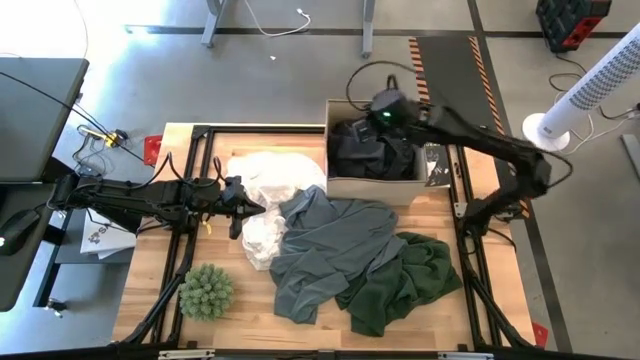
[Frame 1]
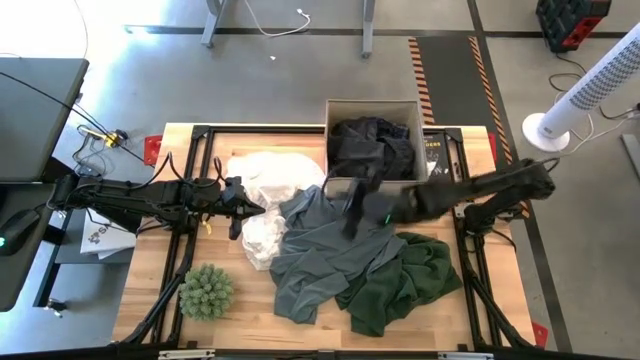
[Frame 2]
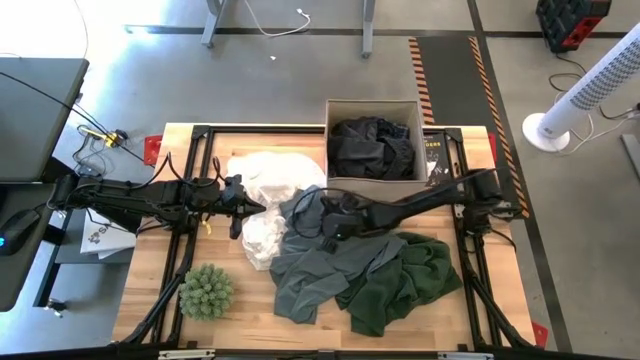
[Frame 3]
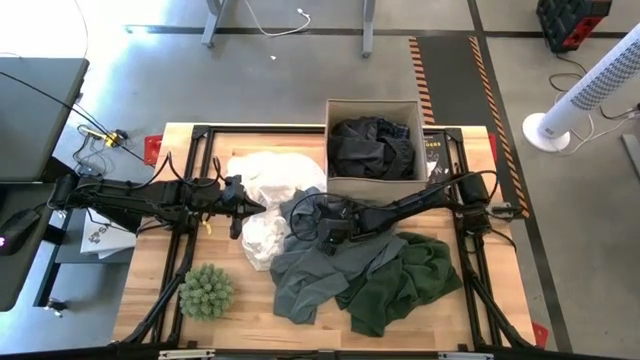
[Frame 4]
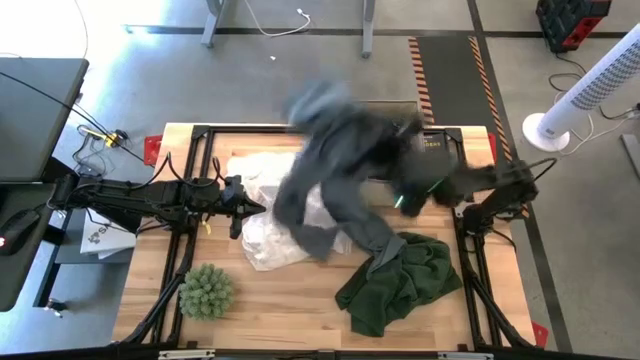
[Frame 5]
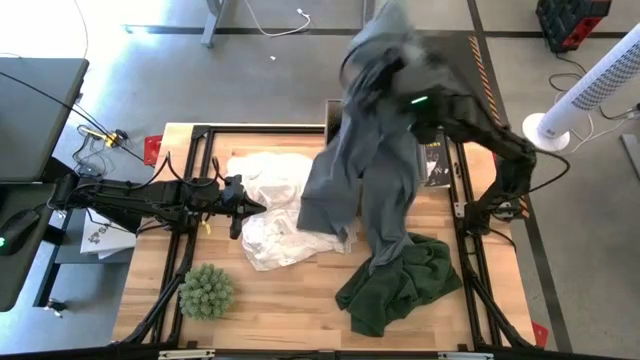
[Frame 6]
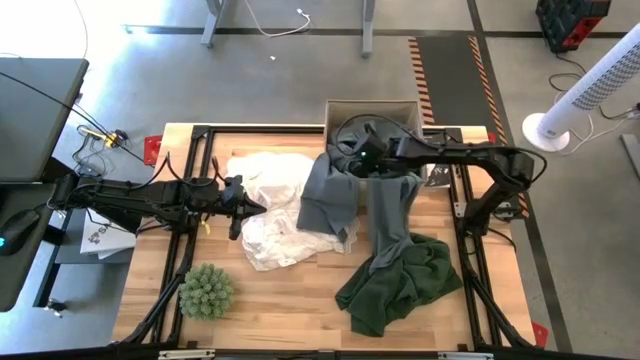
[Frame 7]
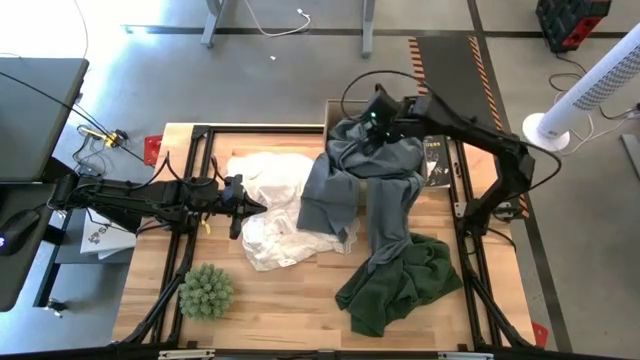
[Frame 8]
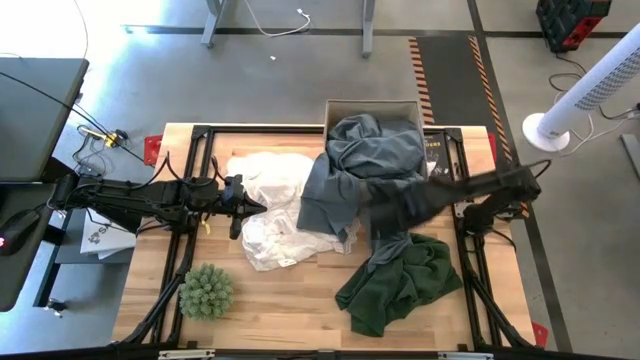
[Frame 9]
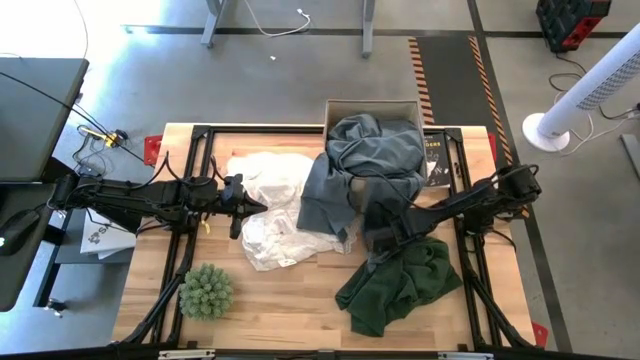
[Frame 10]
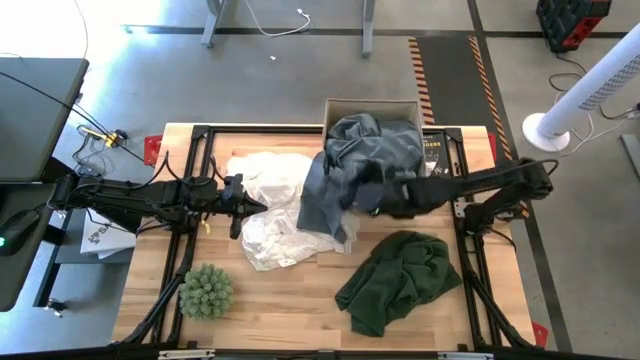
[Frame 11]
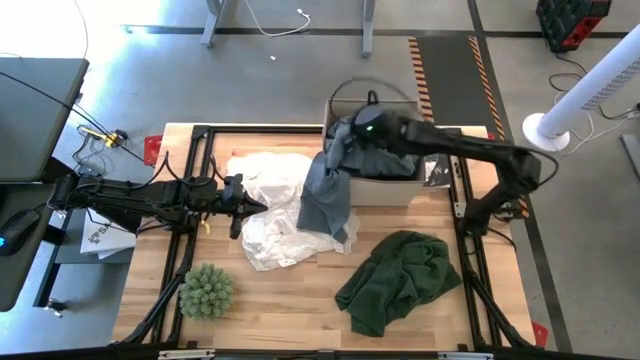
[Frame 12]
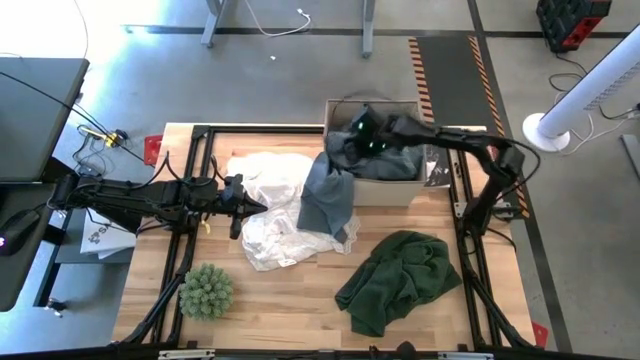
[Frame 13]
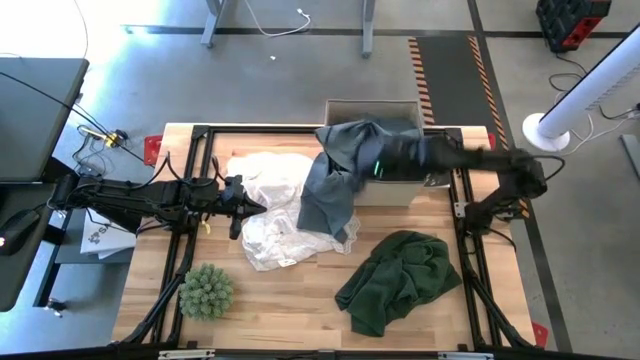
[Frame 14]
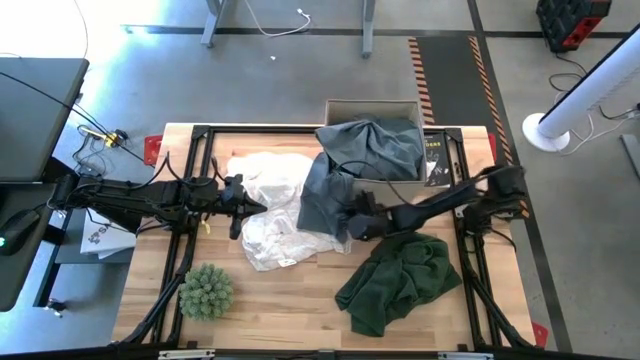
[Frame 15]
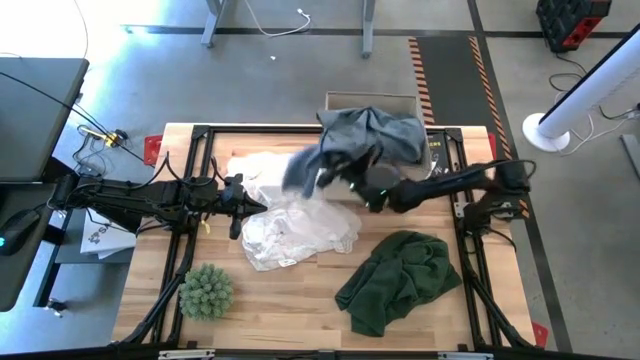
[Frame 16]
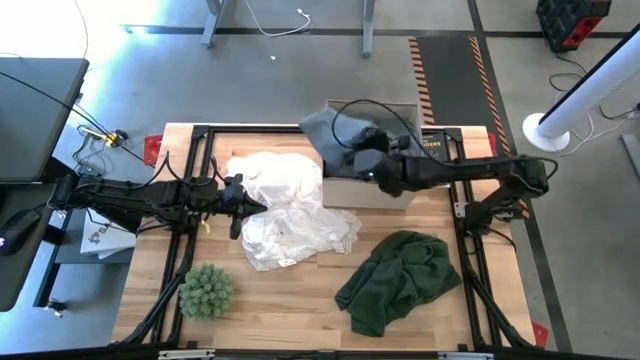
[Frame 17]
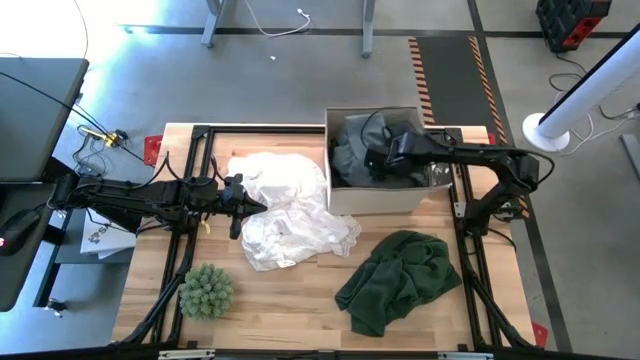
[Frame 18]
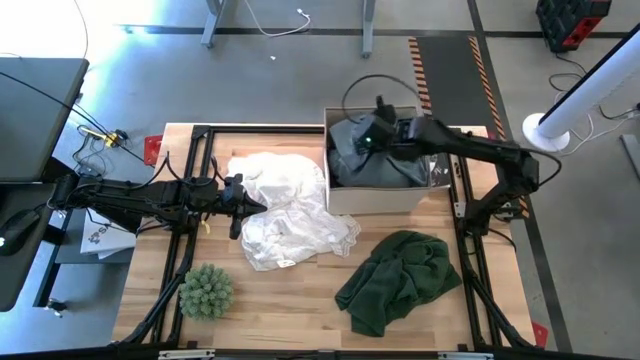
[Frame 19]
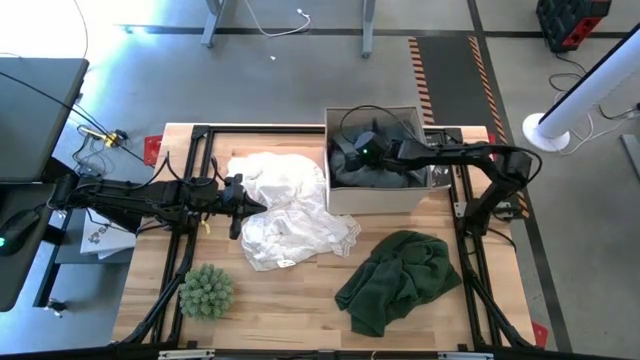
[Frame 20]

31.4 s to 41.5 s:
Task: Sort clothes
Put the gray pants into the laundry bin

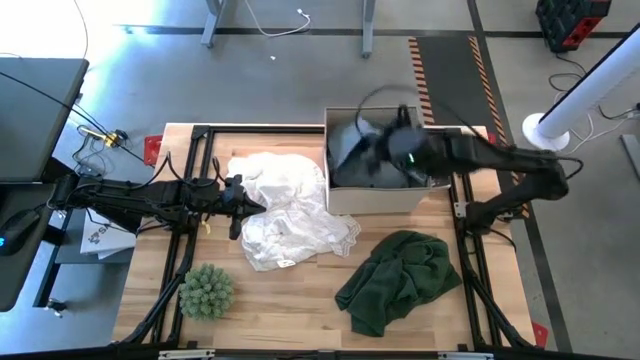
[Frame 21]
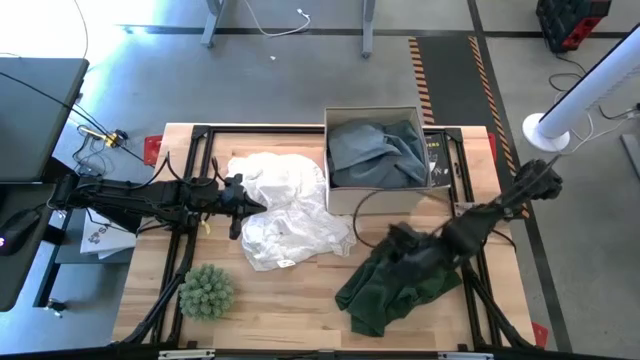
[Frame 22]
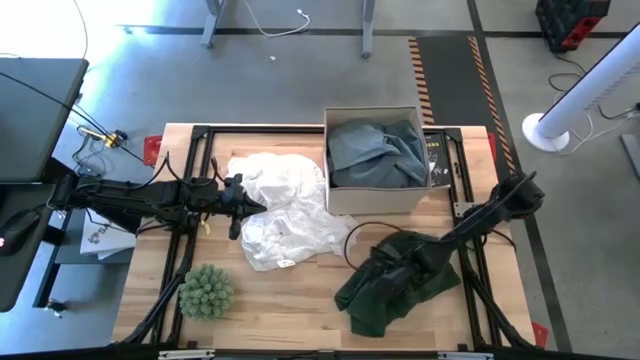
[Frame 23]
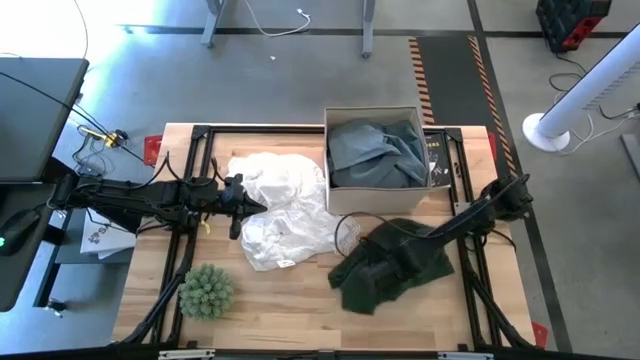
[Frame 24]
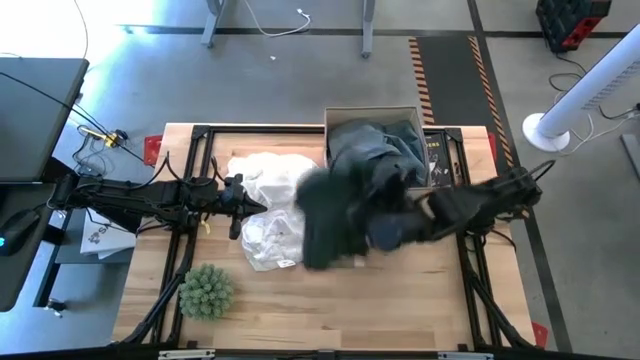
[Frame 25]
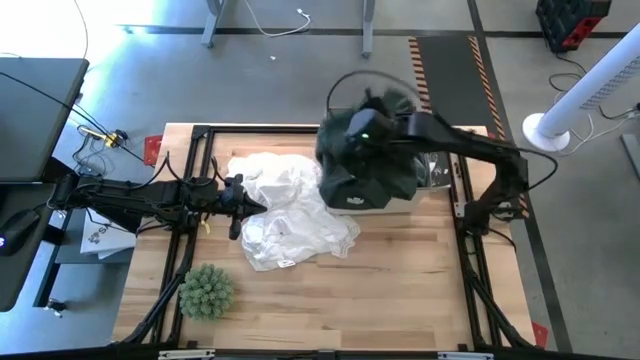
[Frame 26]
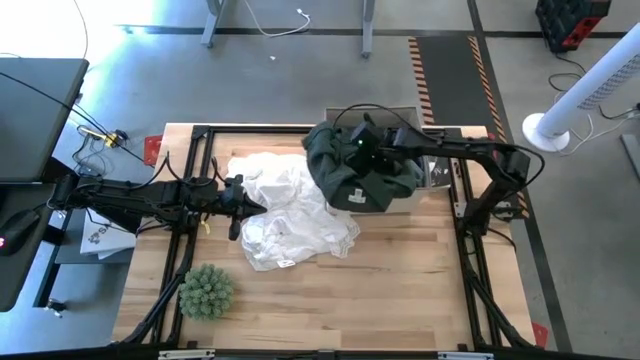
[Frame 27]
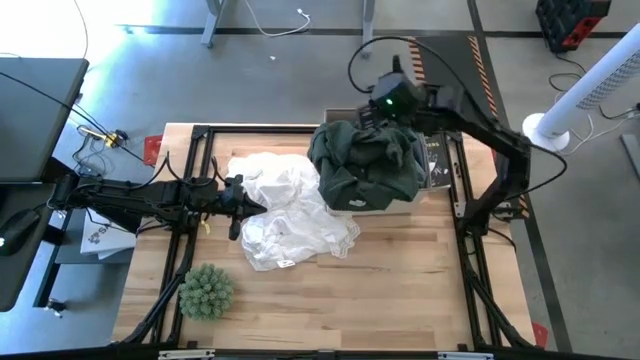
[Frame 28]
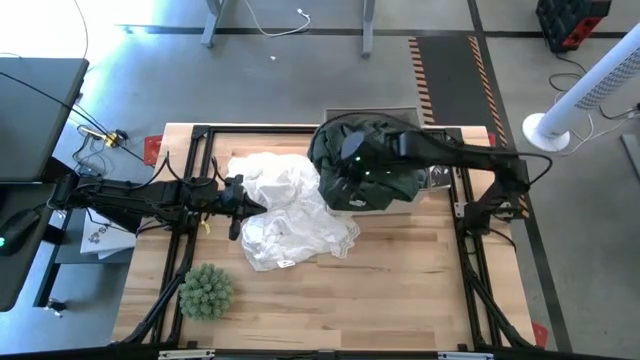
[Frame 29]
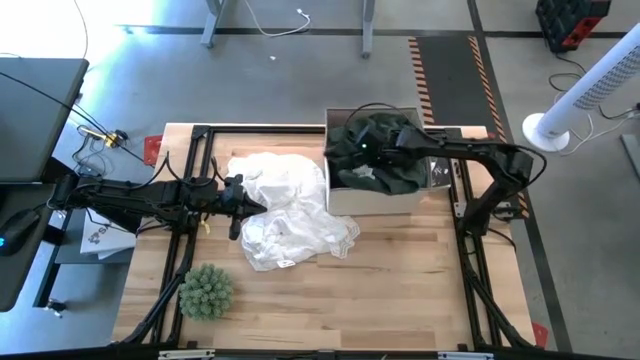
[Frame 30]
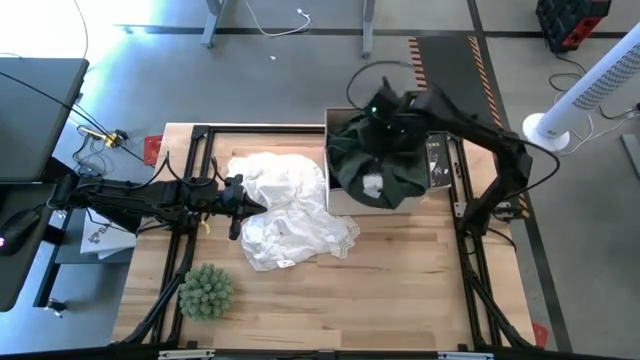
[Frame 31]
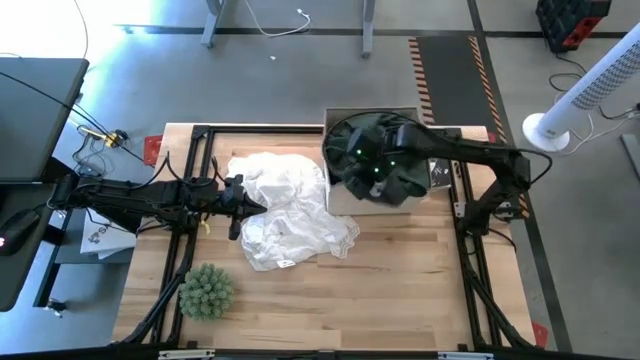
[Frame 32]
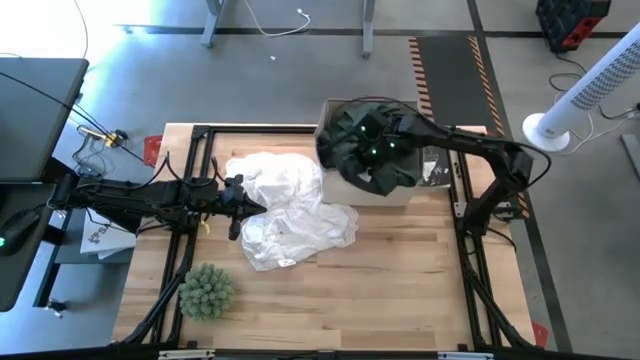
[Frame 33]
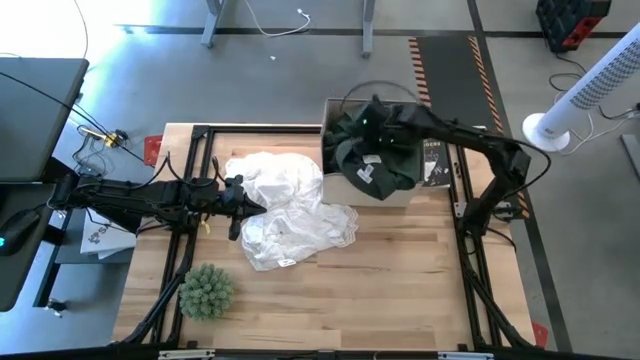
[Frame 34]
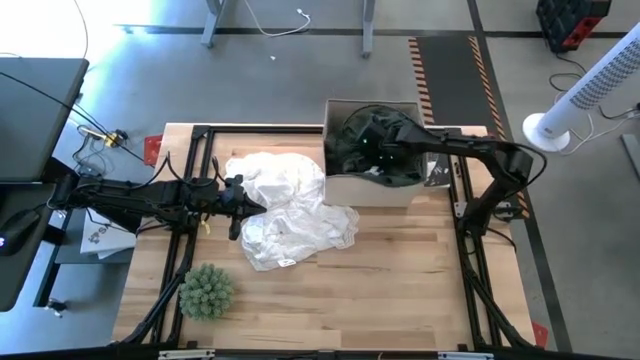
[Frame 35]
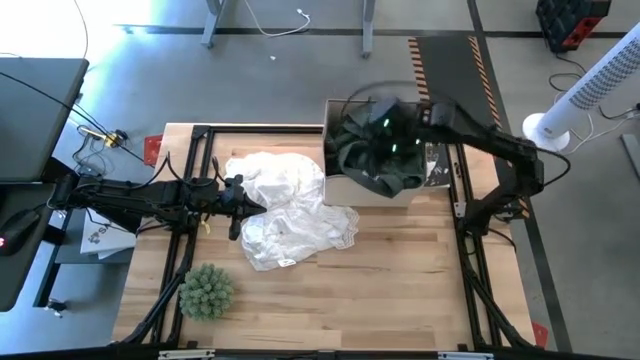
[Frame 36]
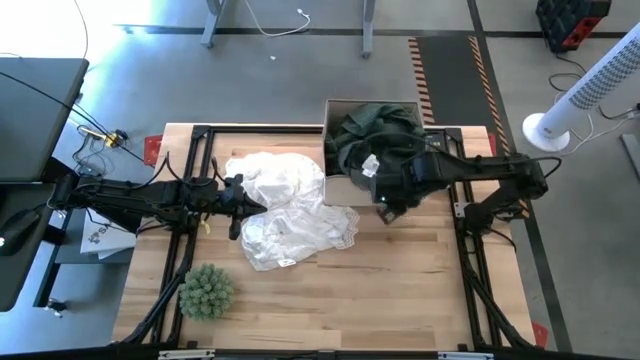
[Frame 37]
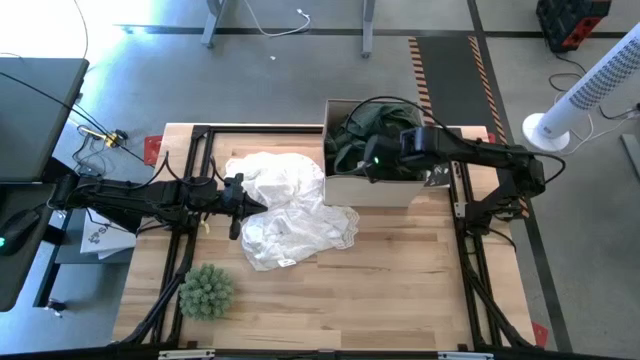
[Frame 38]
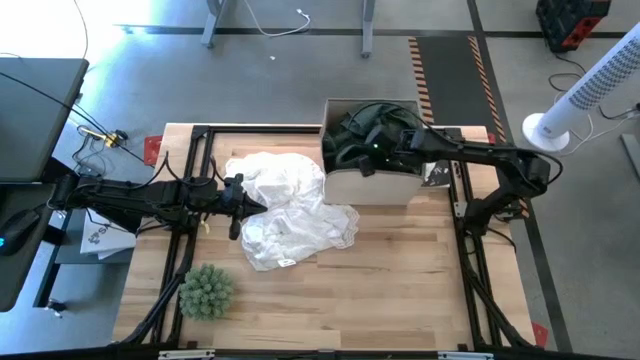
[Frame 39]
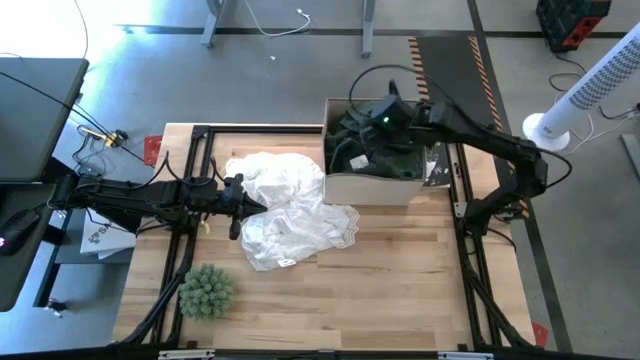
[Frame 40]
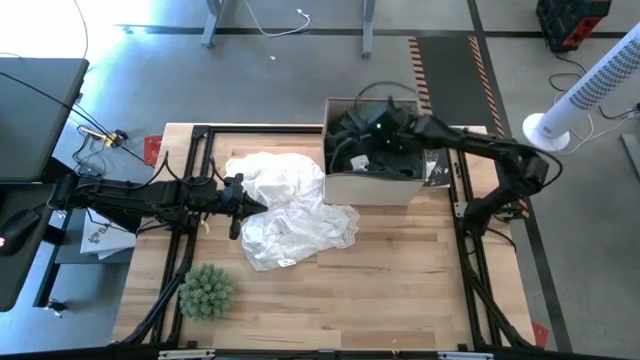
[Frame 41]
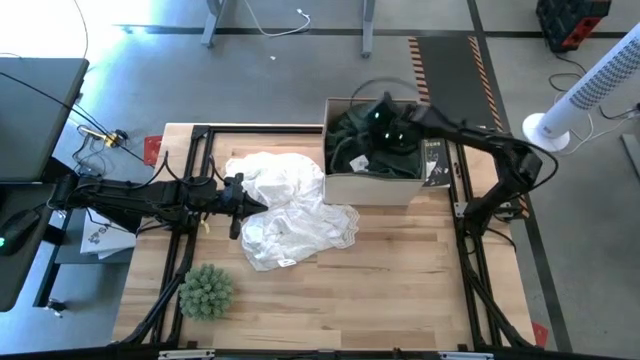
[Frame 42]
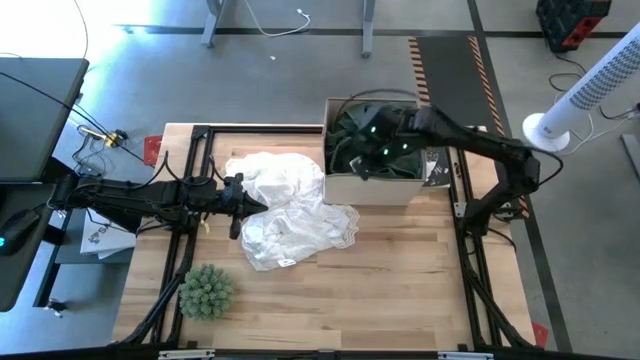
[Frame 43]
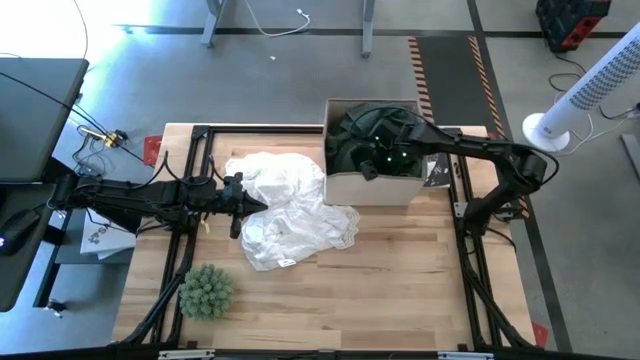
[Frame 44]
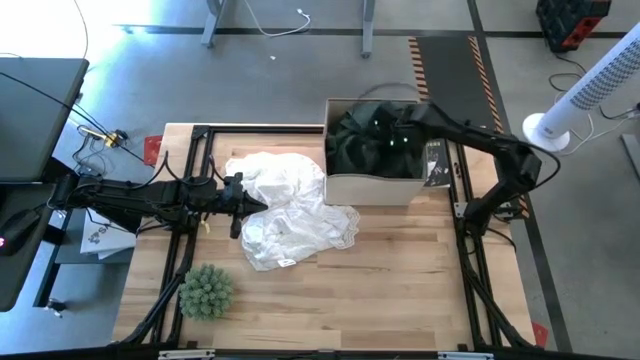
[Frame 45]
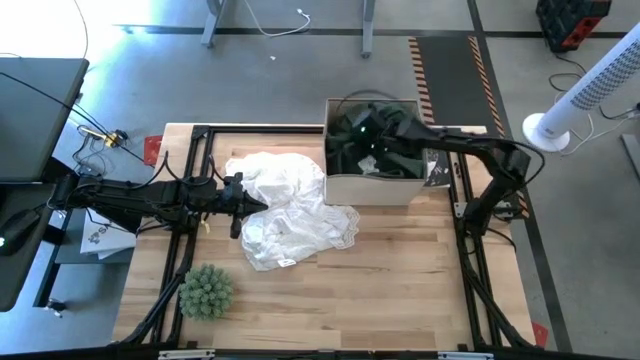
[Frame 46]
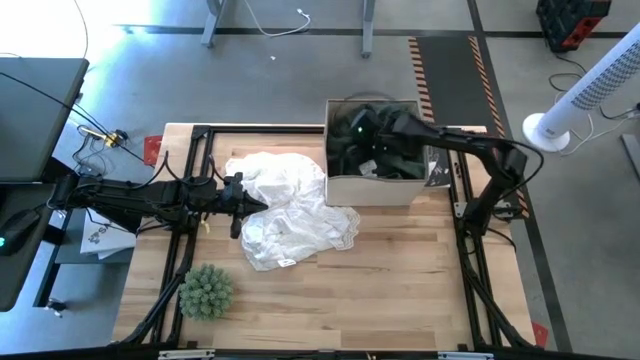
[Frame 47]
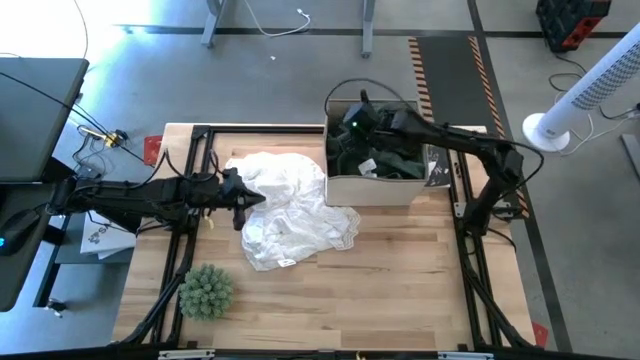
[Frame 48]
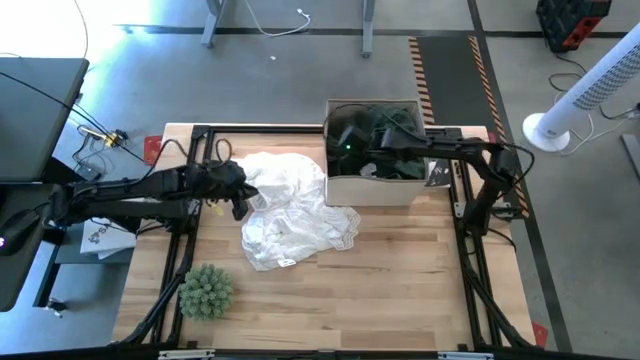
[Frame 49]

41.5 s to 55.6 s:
Put the green polo shirt into the laundry bin
